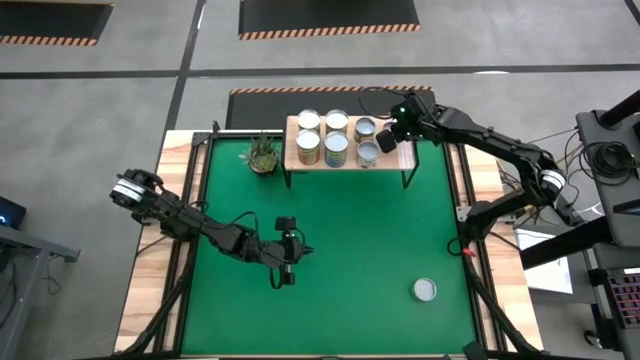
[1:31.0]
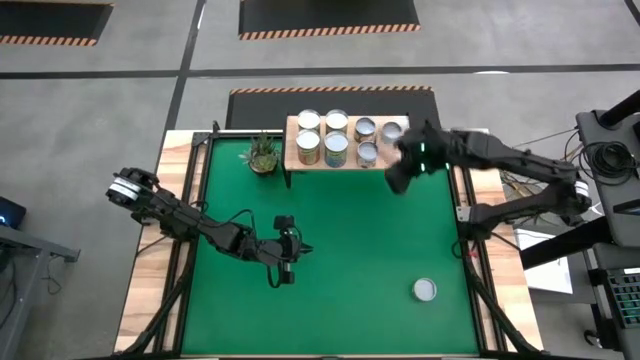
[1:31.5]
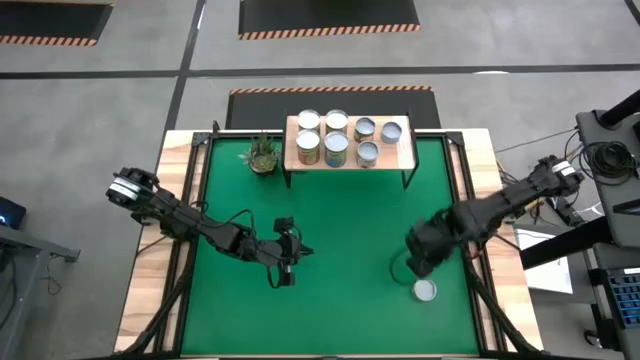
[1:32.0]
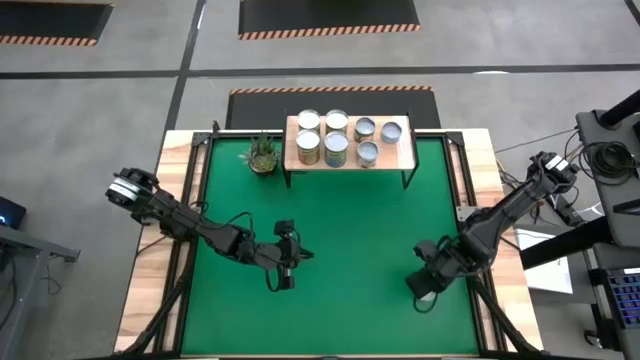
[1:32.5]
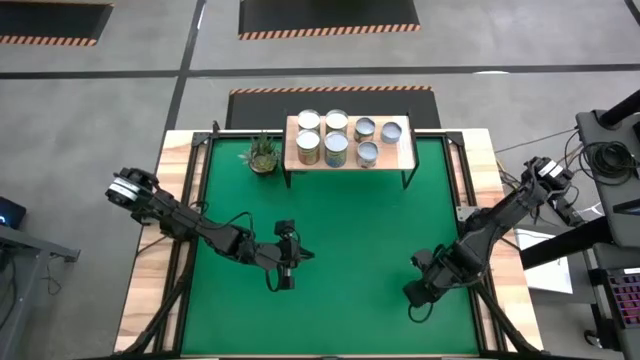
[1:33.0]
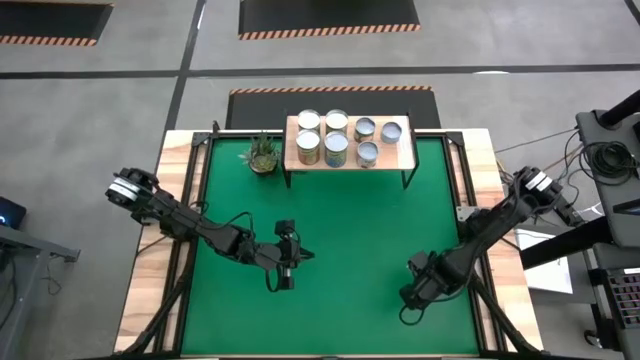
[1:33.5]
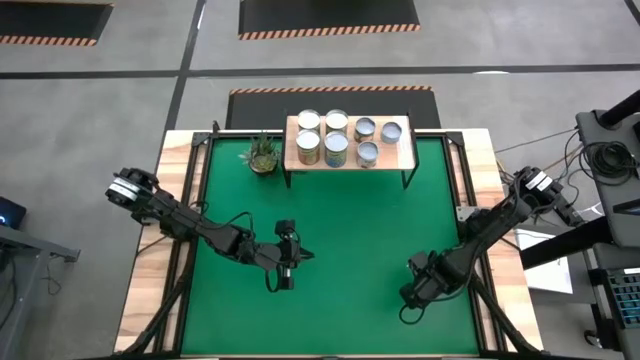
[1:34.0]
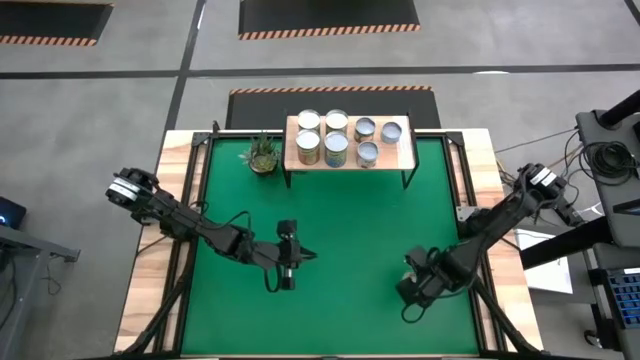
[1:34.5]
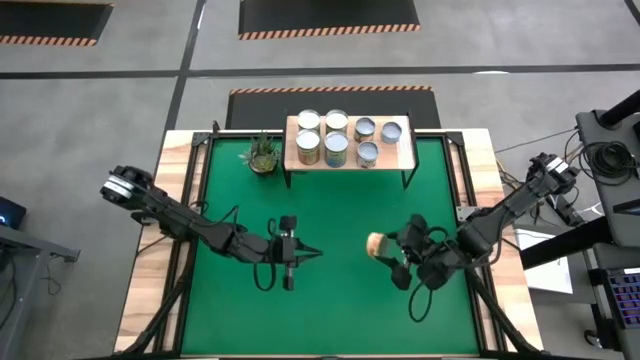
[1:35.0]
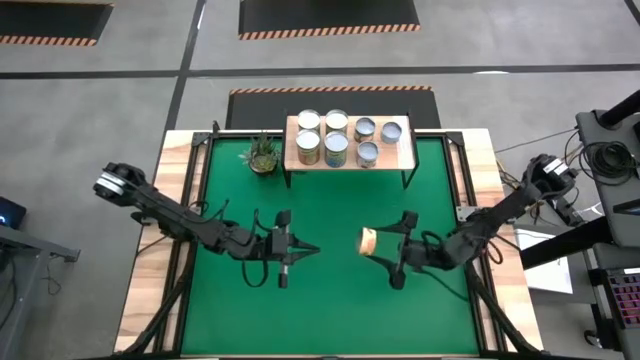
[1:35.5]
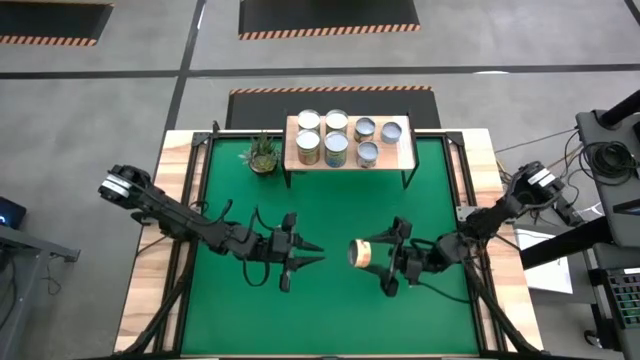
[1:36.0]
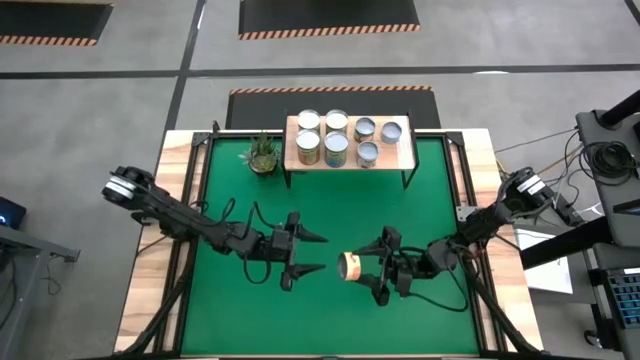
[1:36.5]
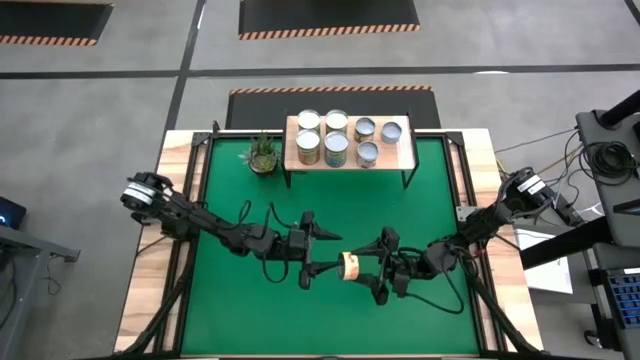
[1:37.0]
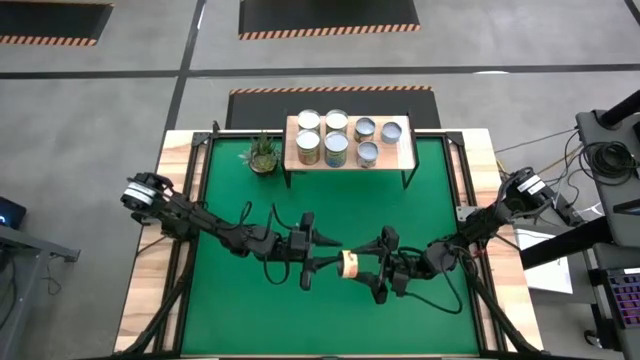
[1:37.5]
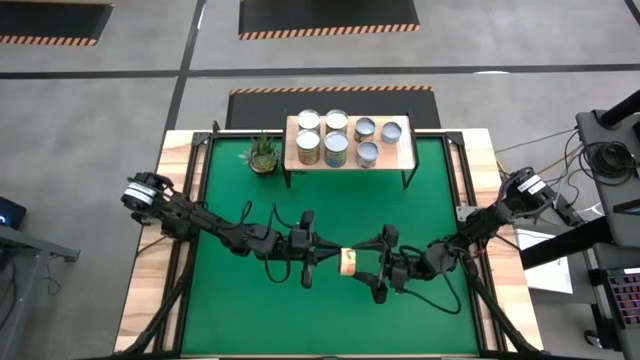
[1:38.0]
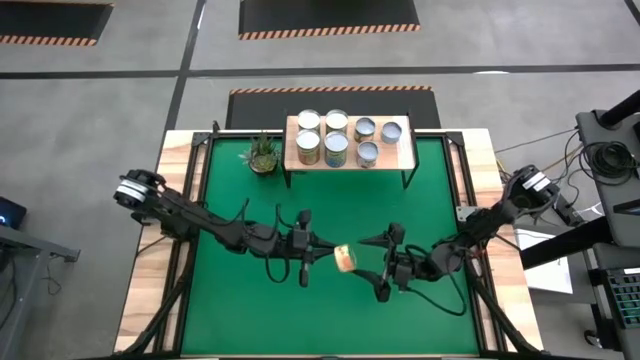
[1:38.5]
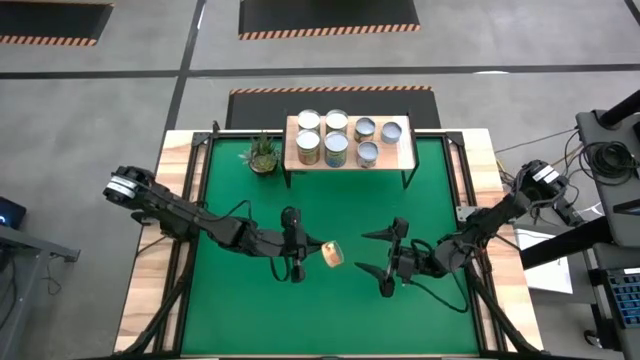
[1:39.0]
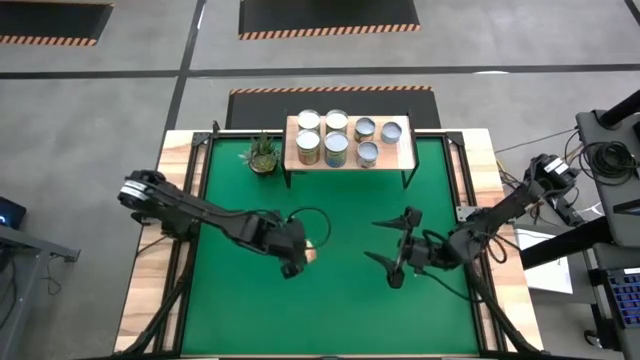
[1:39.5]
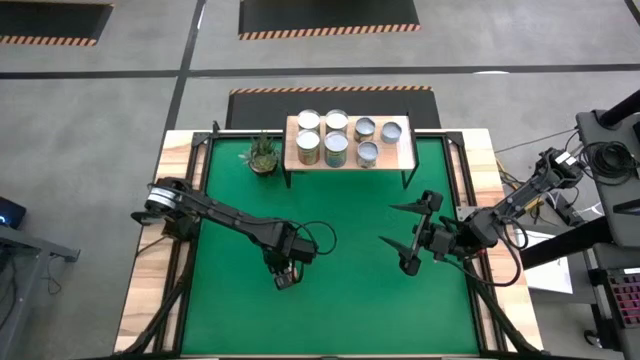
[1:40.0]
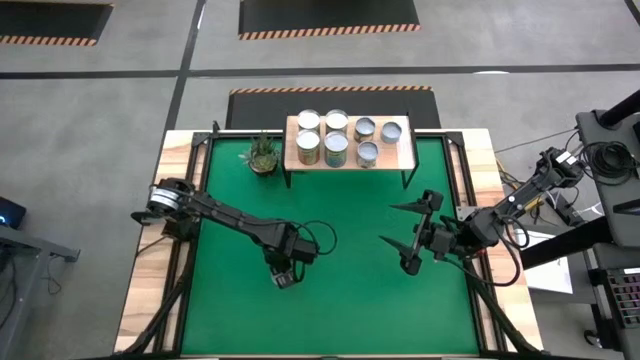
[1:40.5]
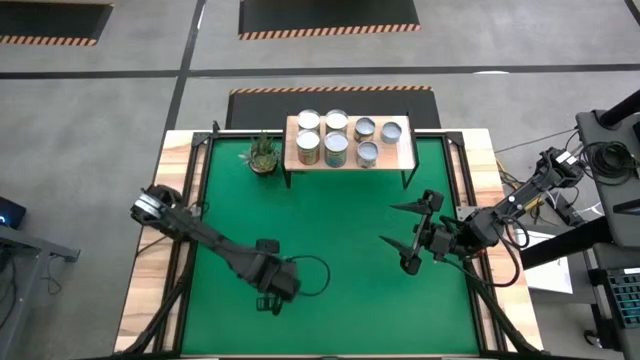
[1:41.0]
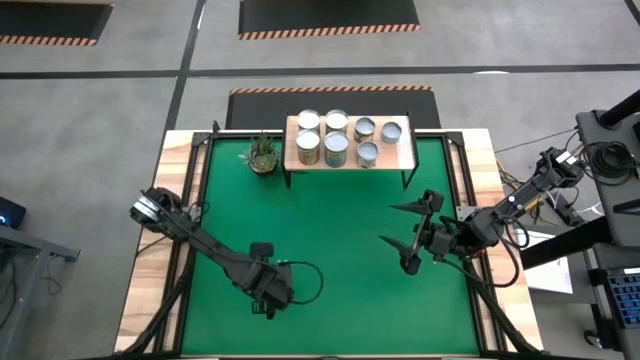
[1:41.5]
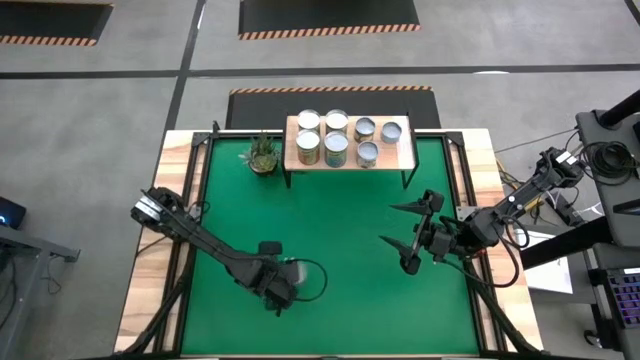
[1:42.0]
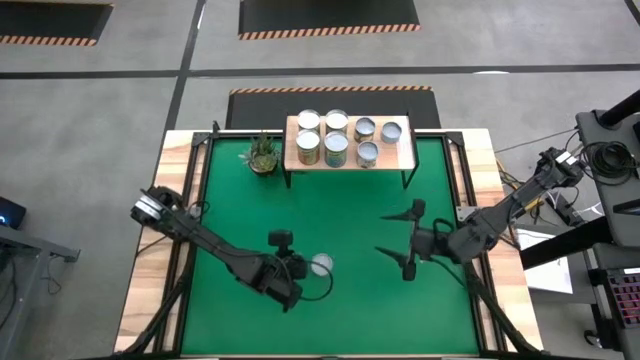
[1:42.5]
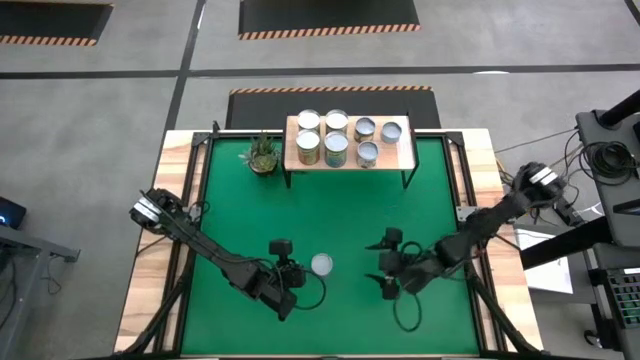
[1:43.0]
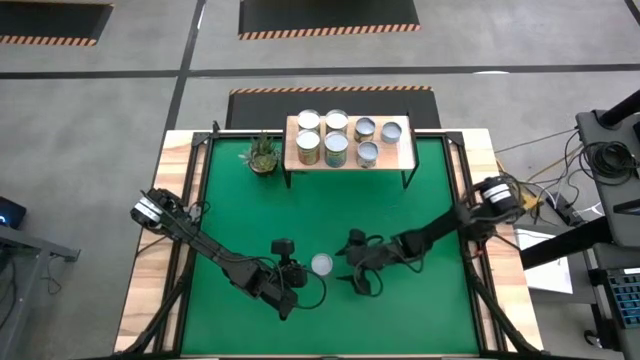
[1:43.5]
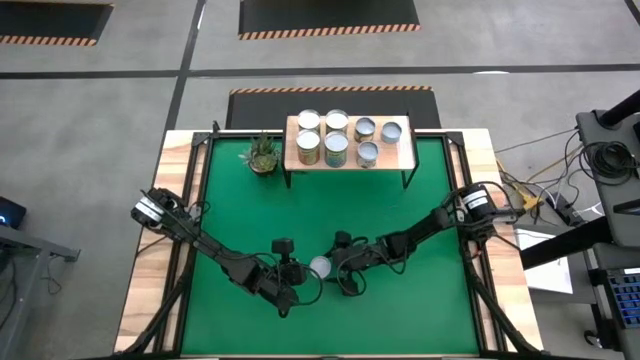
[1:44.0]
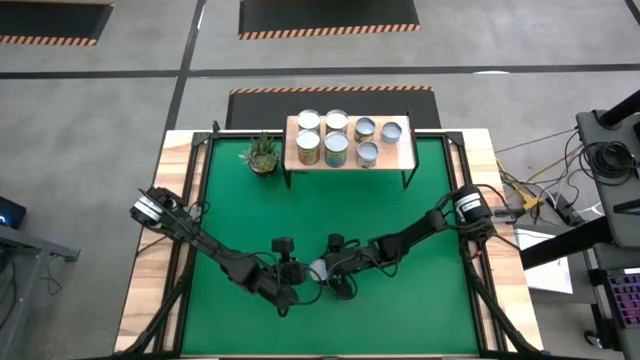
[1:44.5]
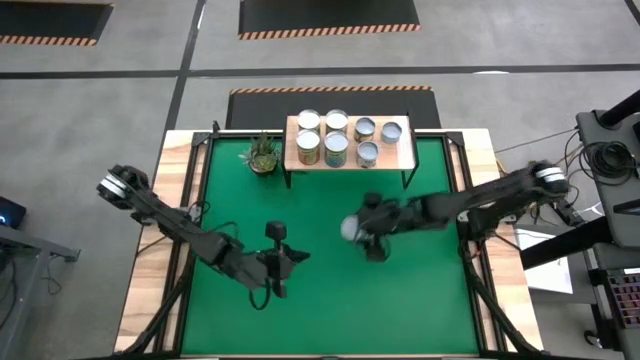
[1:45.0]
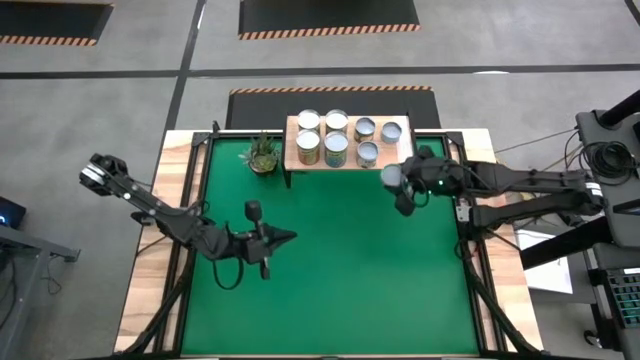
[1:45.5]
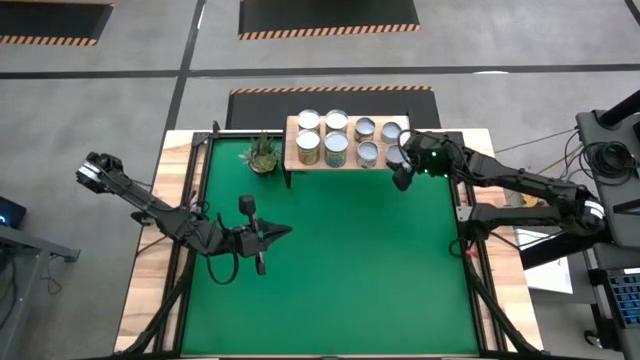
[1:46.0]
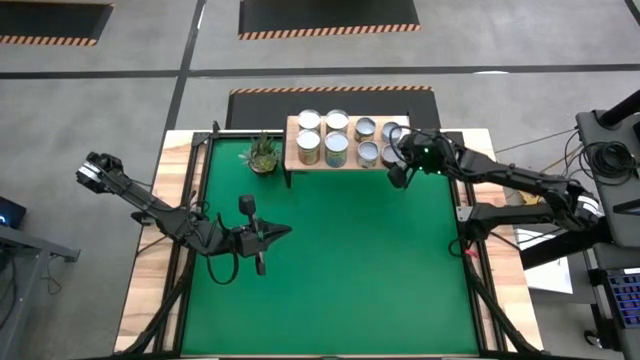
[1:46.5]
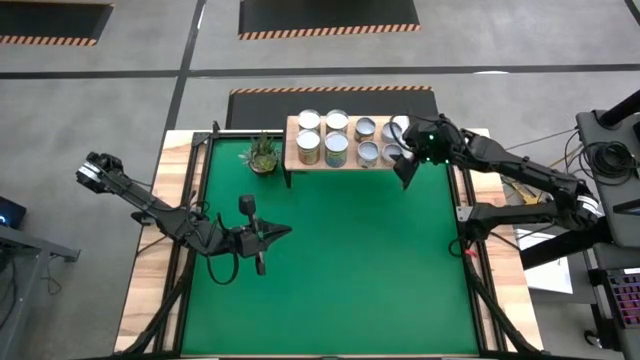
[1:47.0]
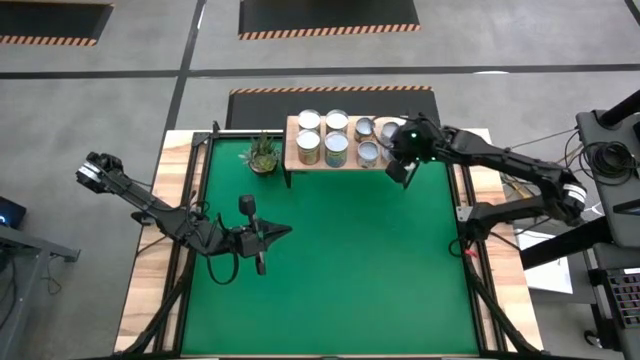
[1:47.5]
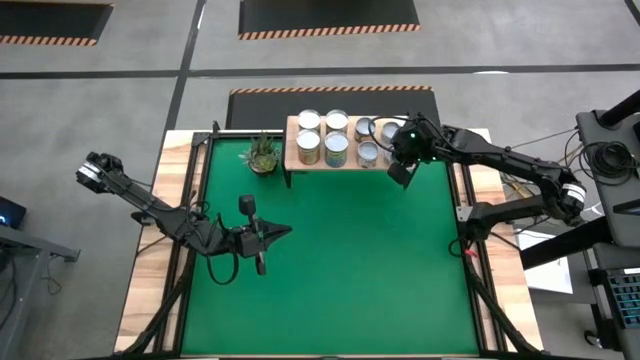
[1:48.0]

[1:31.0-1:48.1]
Task: Pick and place cans onto a shelf
Put the canned mushrooms on the shelf

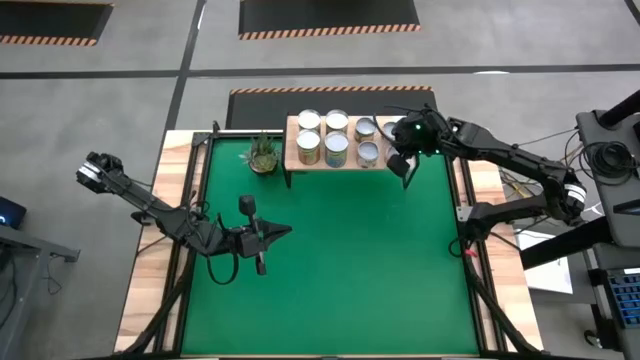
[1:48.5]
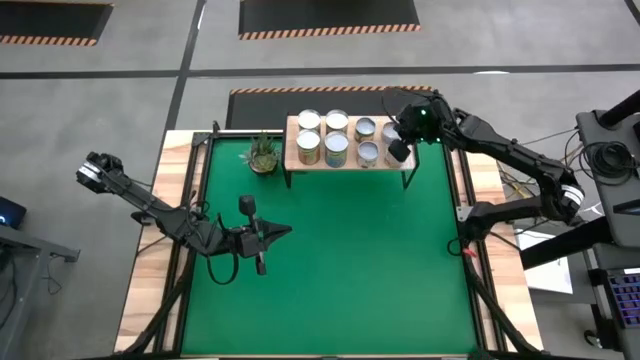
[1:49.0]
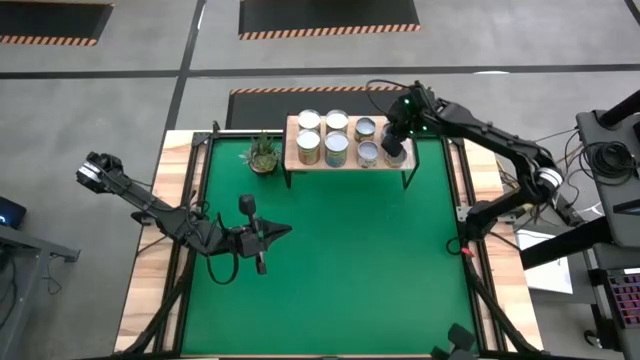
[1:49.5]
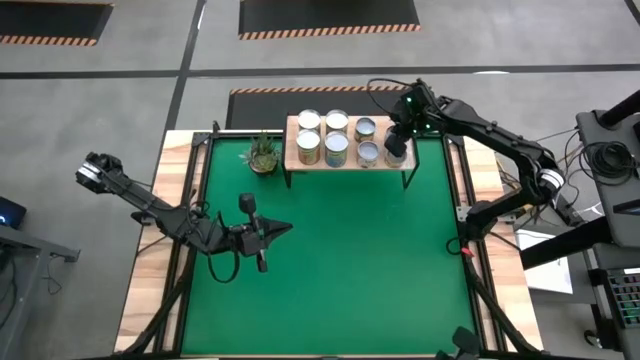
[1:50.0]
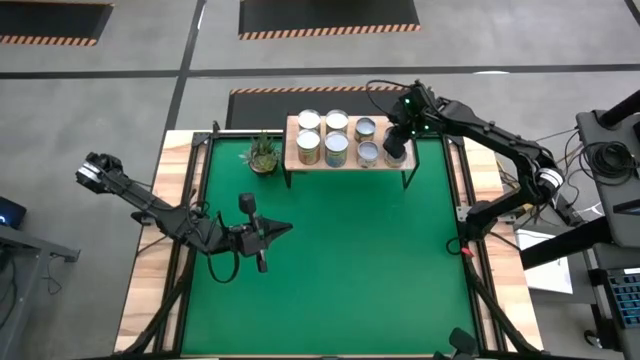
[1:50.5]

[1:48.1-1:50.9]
Adjust the canned tuna on the shelf

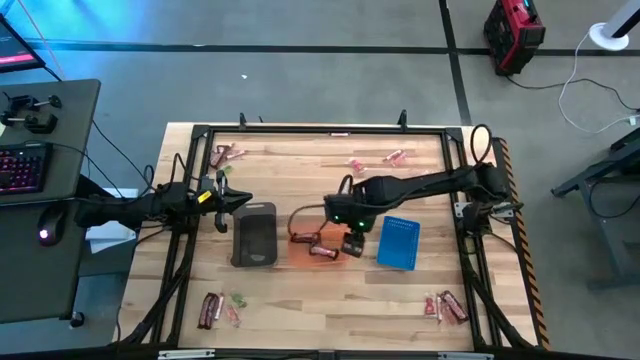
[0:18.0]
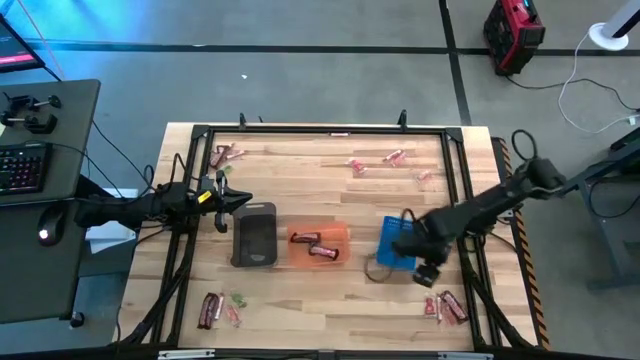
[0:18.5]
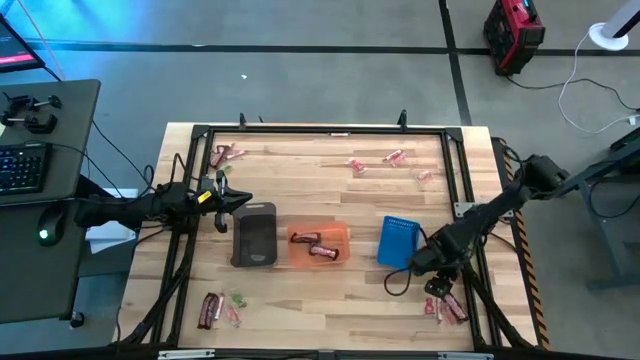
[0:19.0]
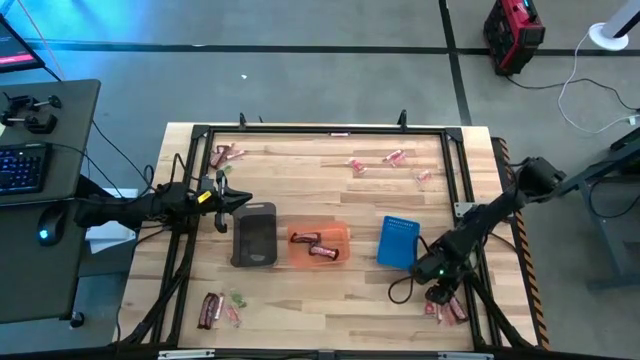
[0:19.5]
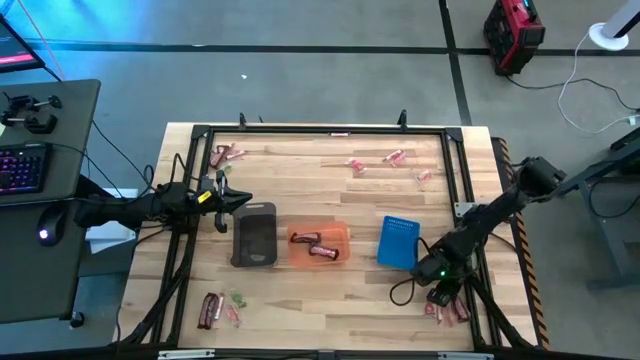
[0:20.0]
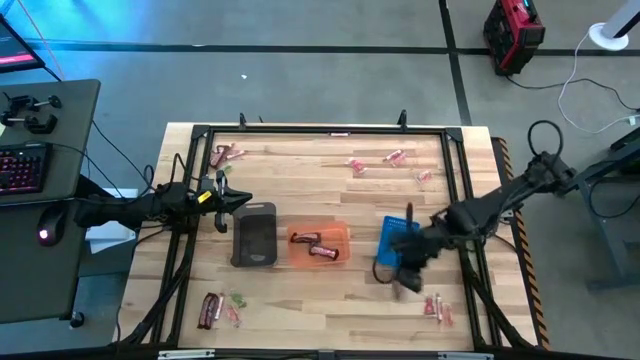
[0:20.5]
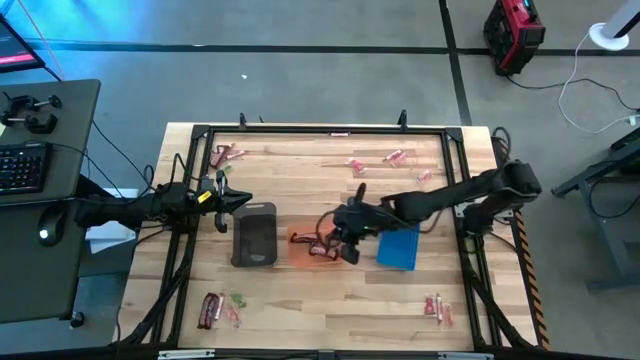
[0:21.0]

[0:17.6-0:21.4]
Task: Sort candy by brand, put in halloween buckets
Put the brown chocolate into the orange bin
